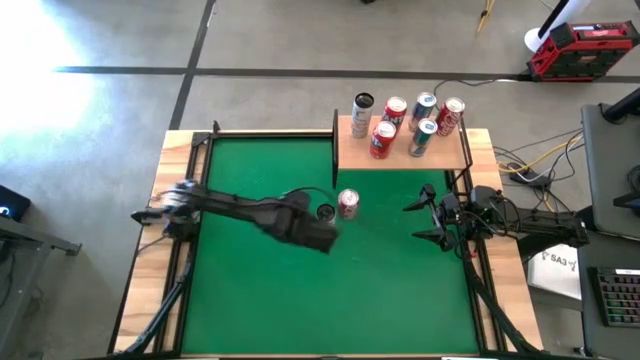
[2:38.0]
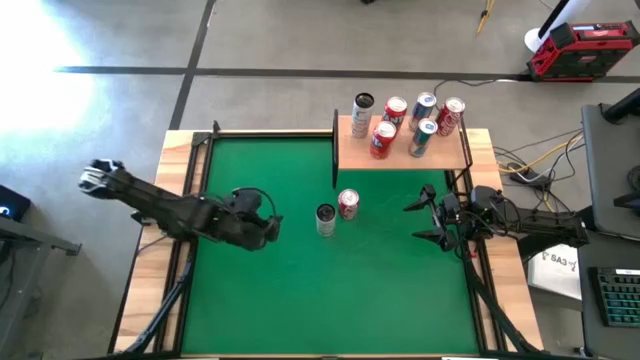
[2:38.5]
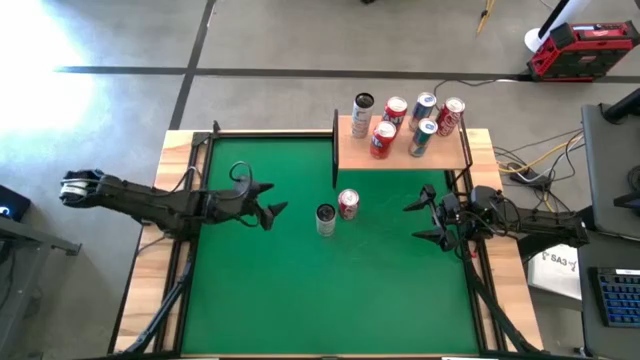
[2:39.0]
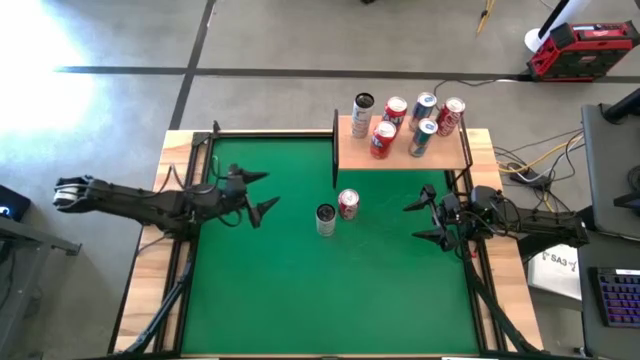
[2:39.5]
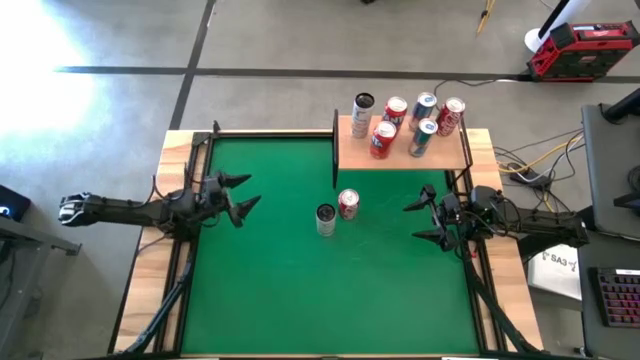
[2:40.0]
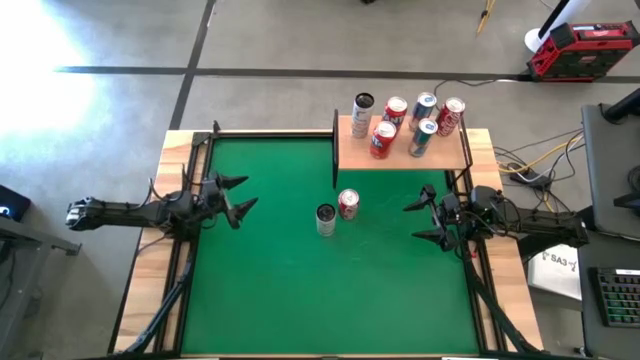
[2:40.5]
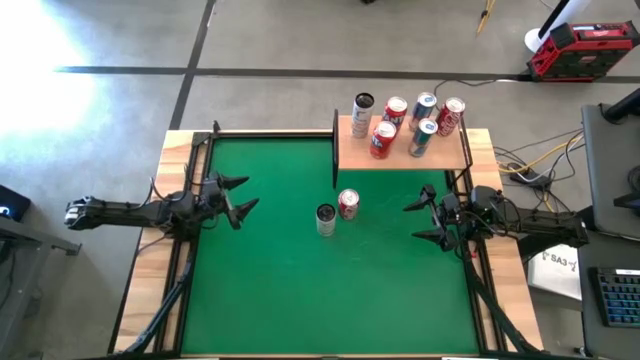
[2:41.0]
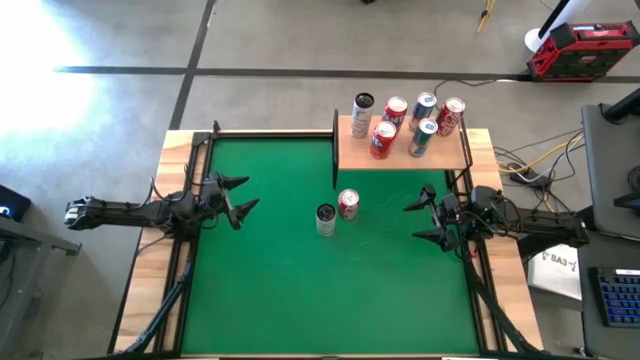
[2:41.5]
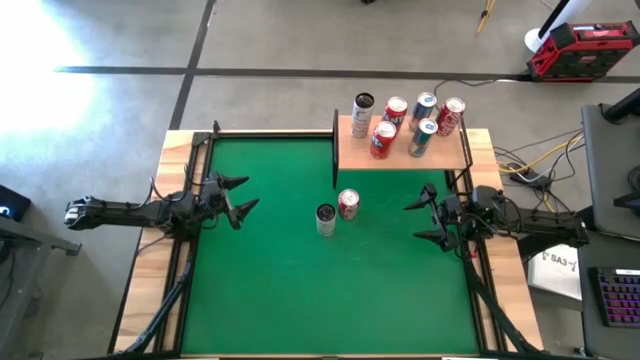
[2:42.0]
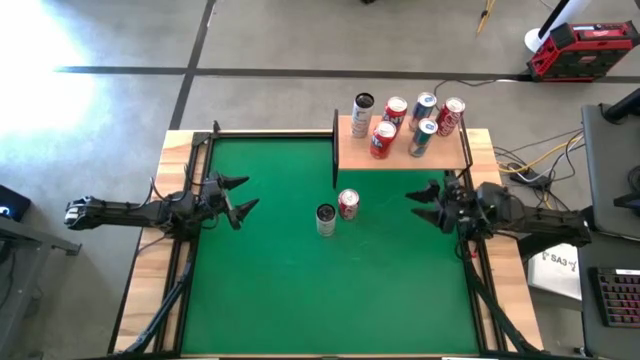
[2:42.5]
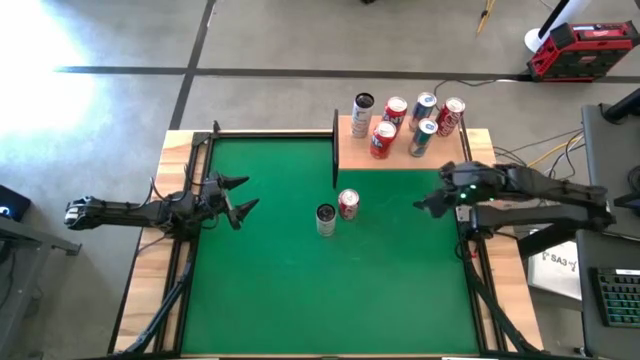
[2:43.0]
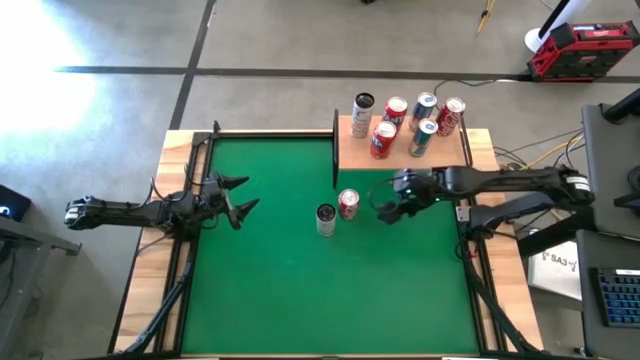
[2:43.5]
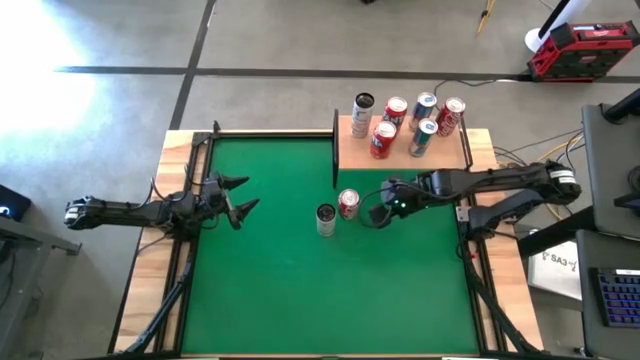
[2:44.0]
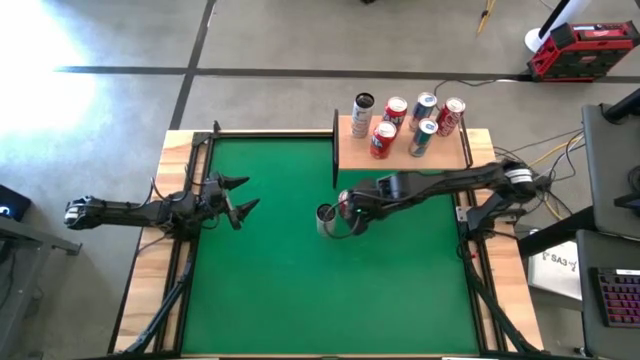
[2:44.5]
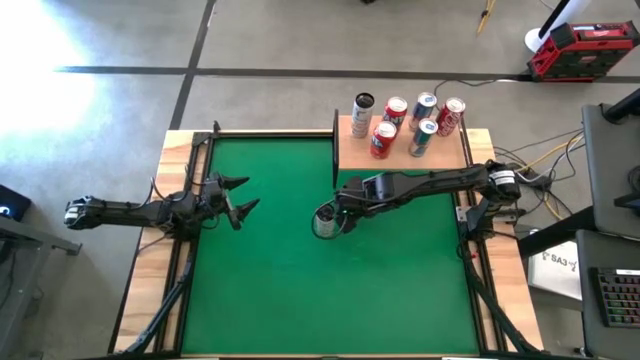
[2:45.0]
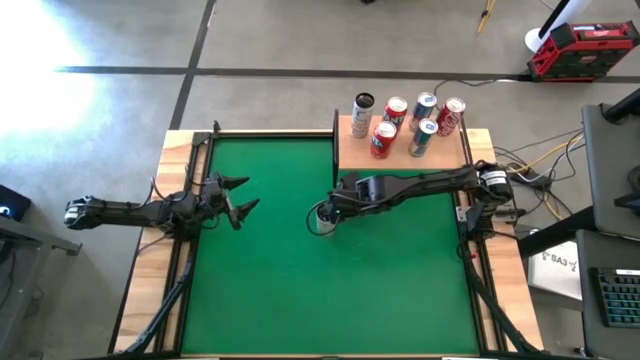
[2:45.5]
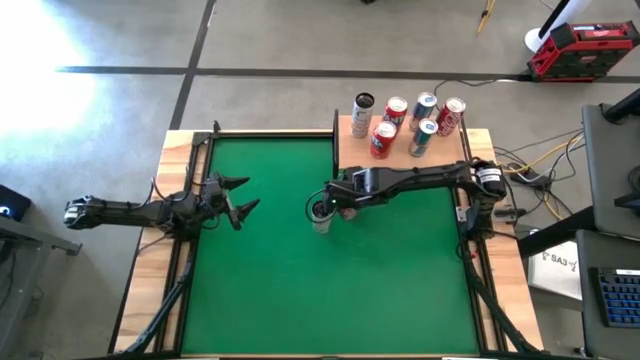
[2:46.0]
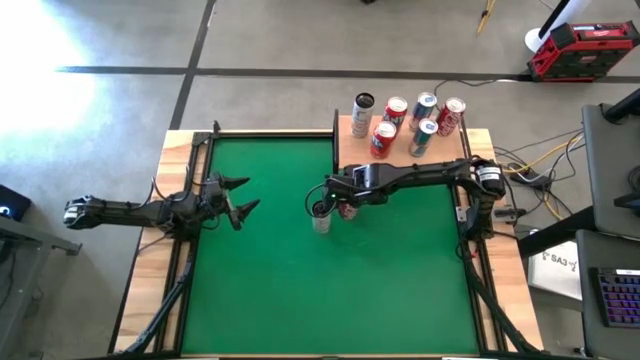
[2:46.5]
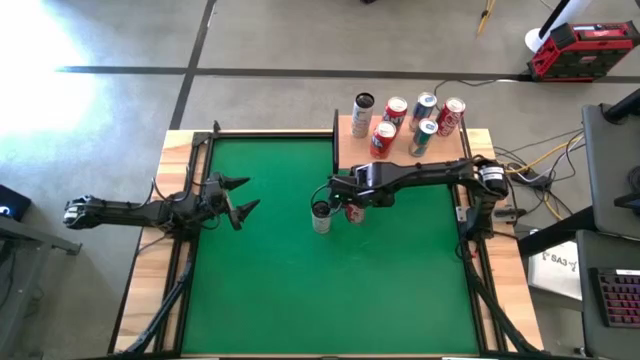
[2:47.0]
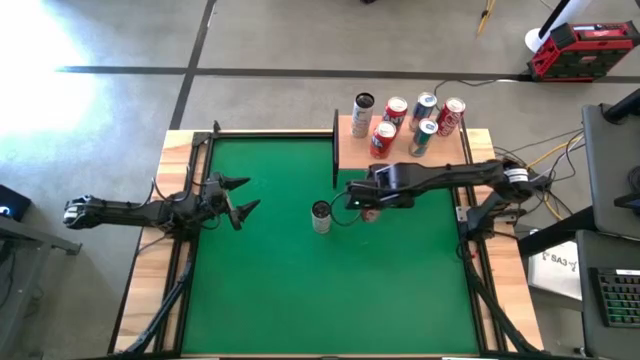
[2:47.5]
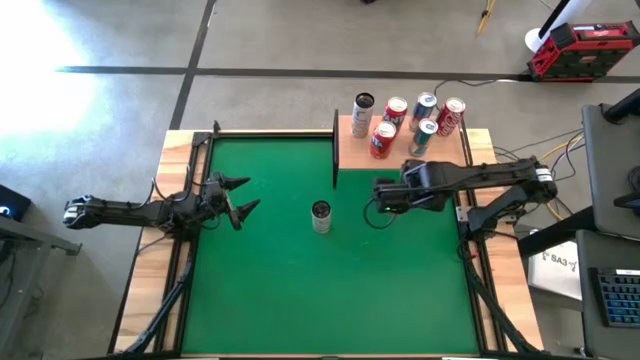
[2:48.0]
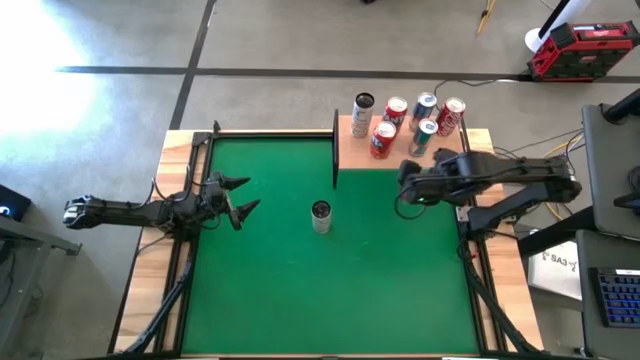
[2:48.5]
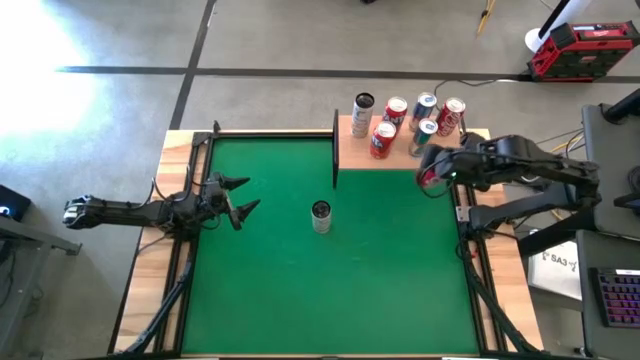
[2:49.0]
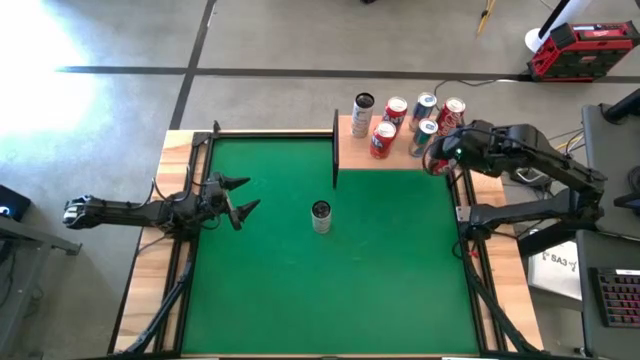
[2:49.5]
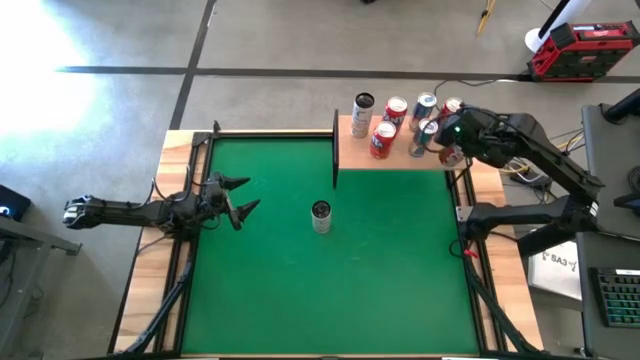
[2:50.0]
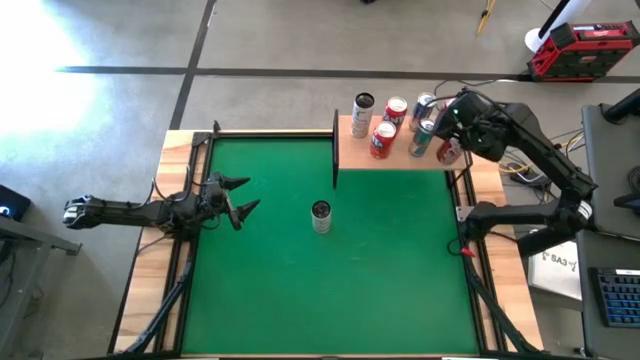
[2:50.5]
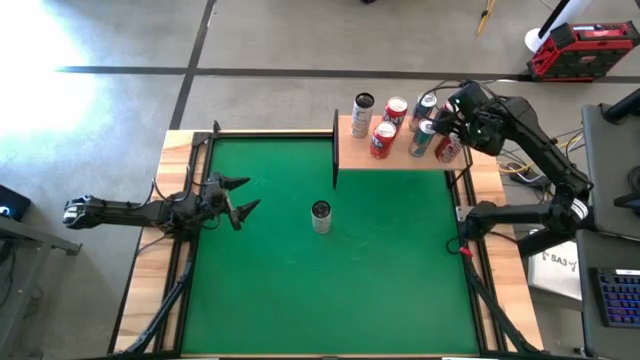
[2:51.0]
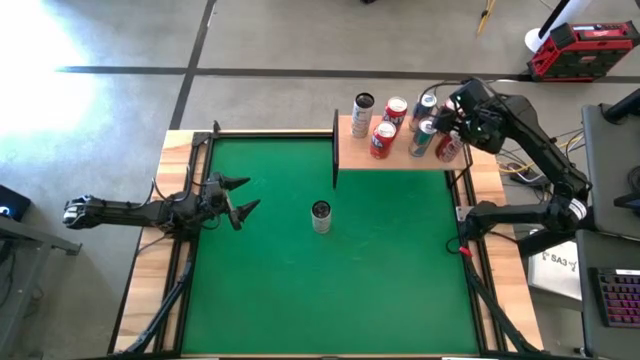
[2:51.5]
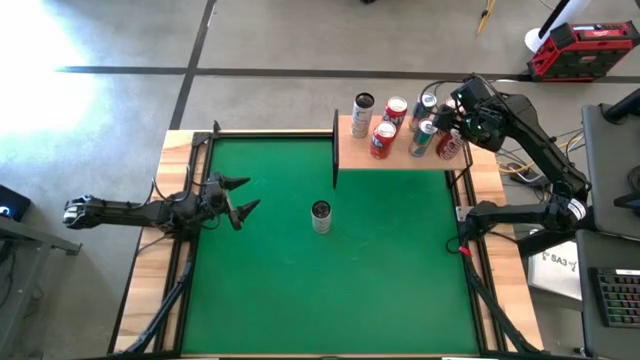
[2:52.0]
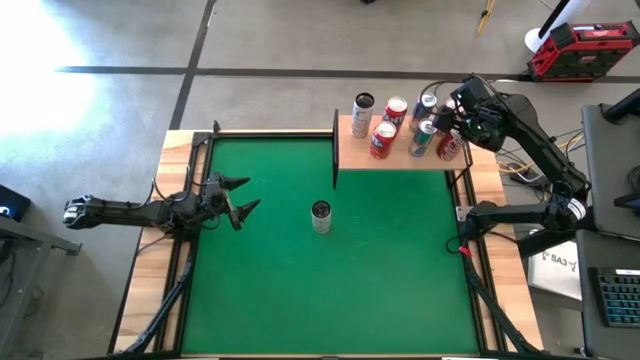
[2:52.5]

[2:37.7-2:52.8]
Task: Place canned beverage on shelf
Put the red-white soda can on the shelf aligned with the other red-white soda can
